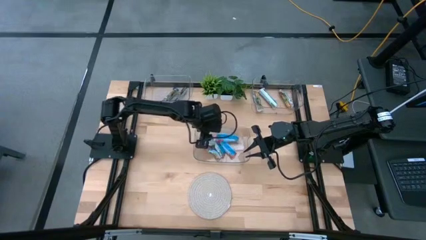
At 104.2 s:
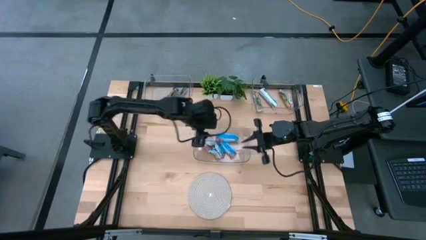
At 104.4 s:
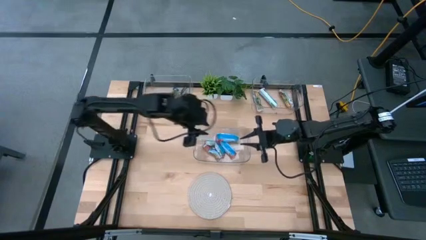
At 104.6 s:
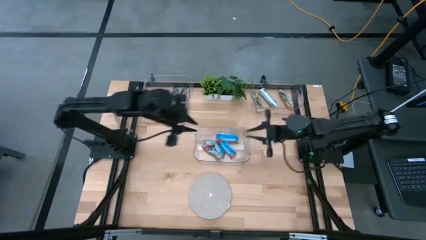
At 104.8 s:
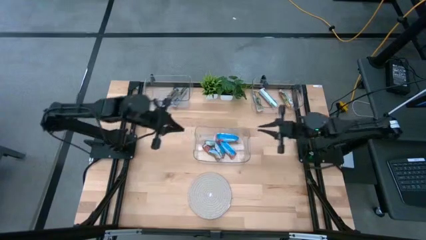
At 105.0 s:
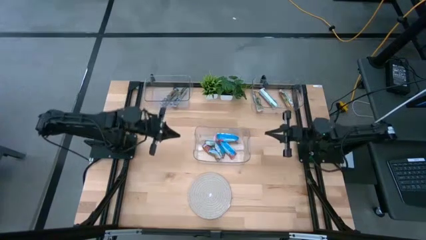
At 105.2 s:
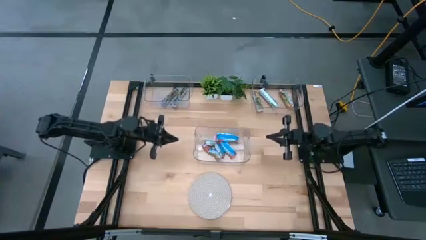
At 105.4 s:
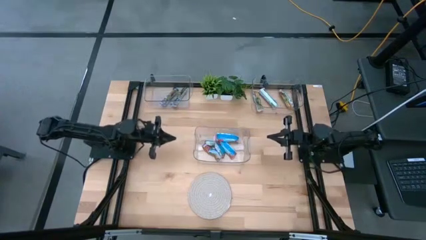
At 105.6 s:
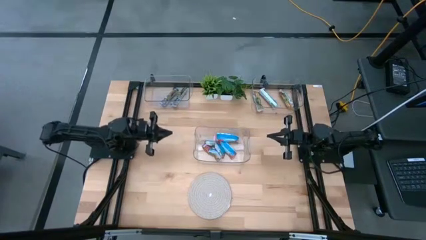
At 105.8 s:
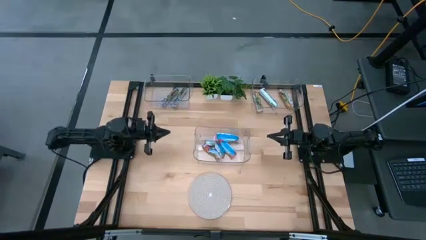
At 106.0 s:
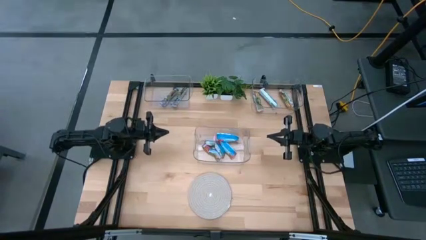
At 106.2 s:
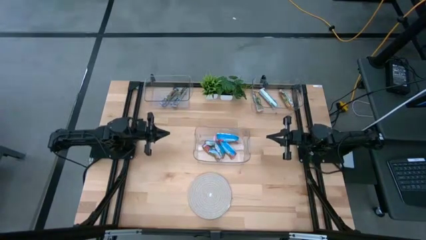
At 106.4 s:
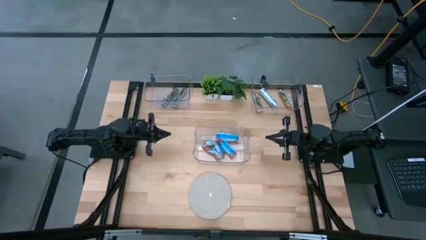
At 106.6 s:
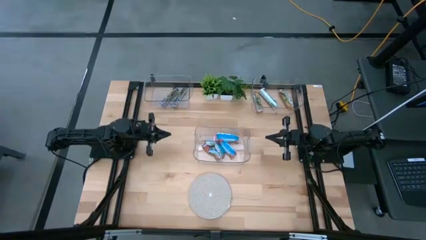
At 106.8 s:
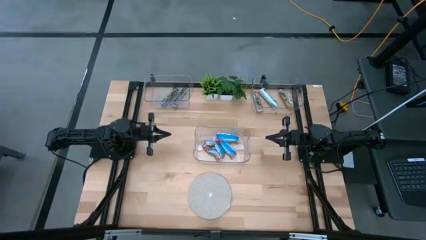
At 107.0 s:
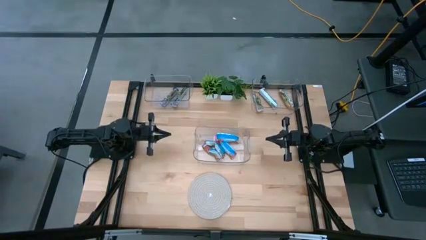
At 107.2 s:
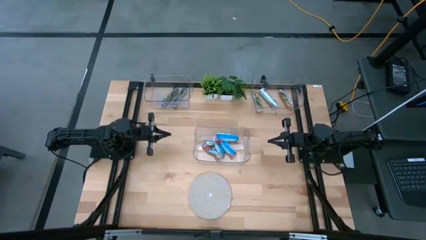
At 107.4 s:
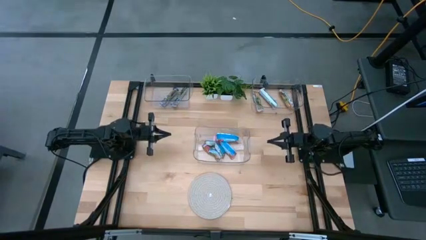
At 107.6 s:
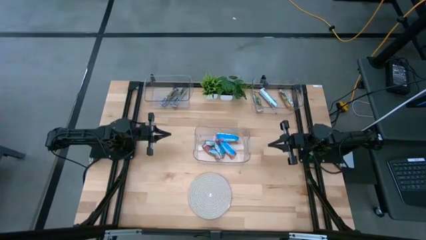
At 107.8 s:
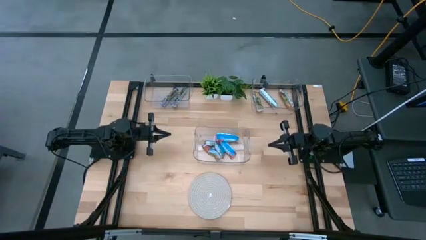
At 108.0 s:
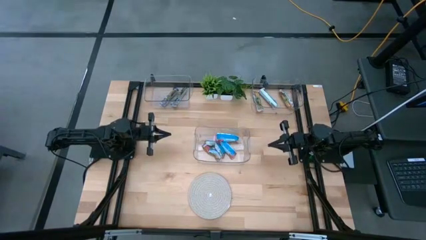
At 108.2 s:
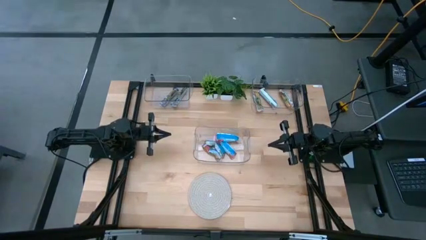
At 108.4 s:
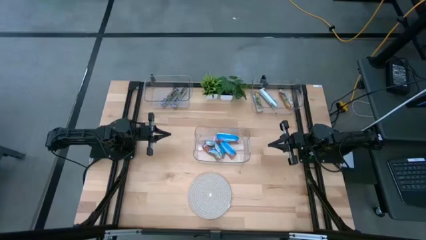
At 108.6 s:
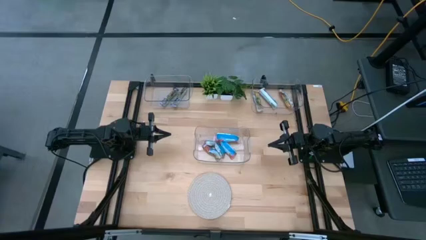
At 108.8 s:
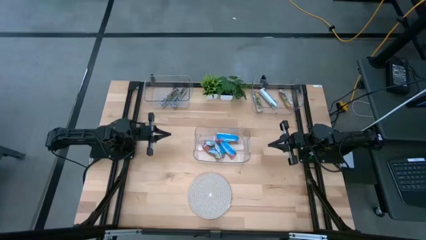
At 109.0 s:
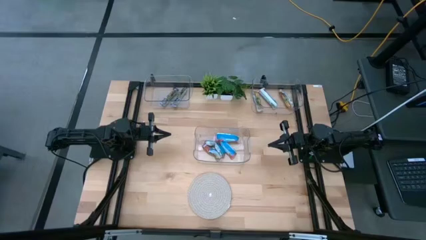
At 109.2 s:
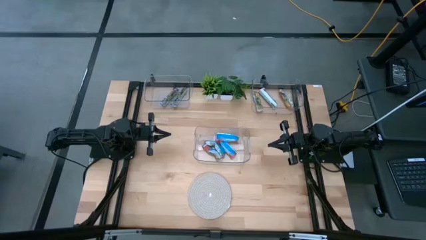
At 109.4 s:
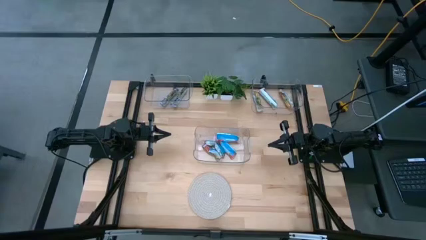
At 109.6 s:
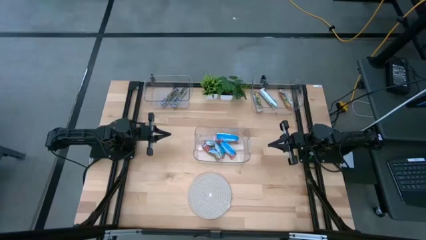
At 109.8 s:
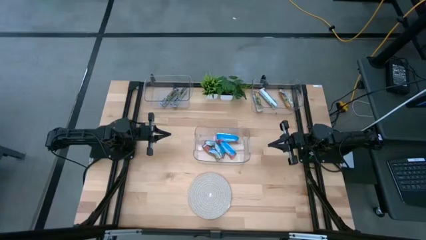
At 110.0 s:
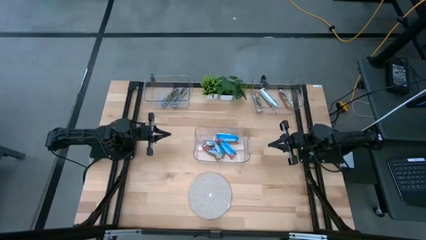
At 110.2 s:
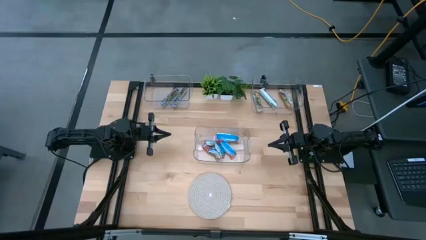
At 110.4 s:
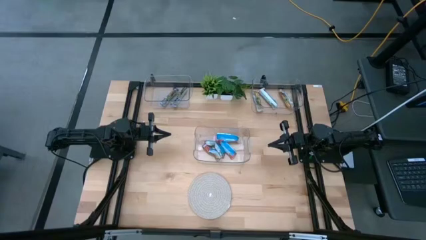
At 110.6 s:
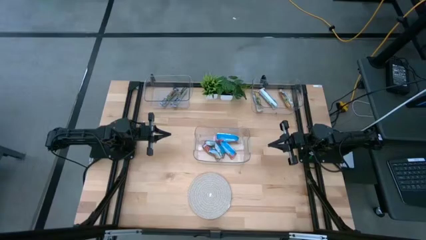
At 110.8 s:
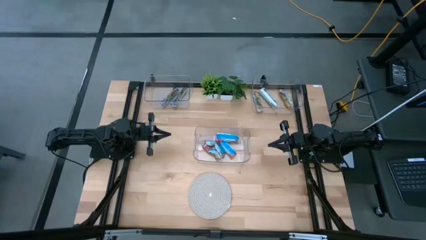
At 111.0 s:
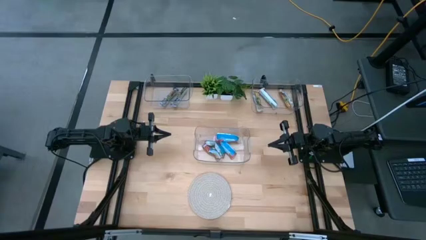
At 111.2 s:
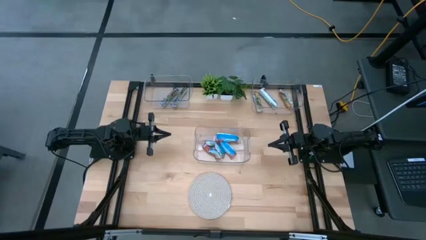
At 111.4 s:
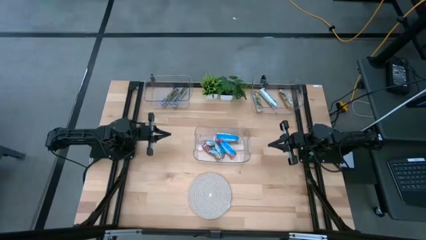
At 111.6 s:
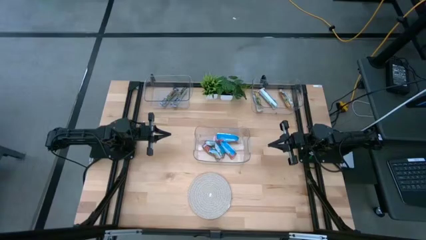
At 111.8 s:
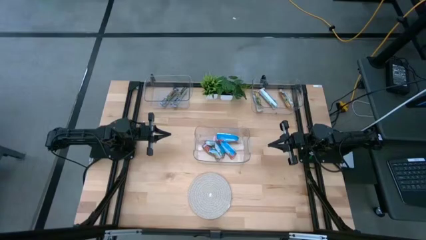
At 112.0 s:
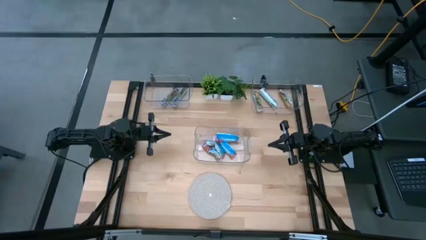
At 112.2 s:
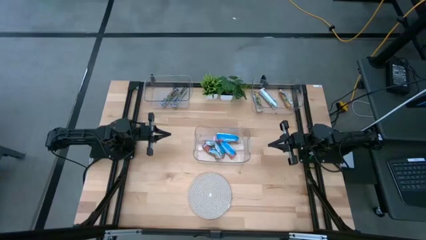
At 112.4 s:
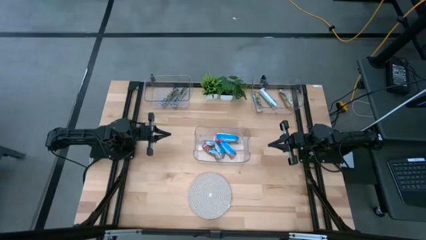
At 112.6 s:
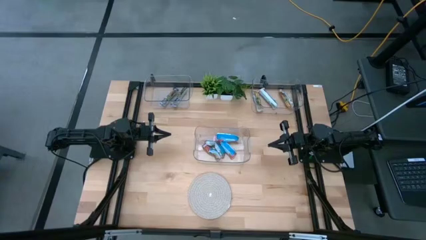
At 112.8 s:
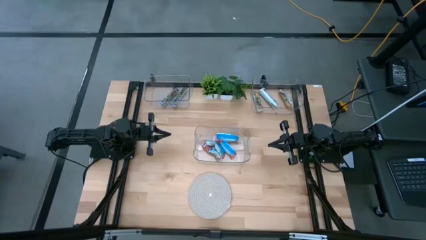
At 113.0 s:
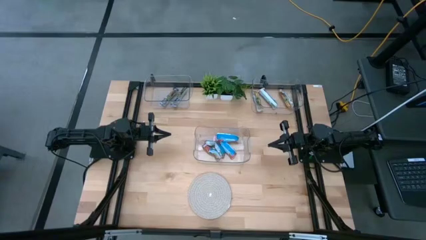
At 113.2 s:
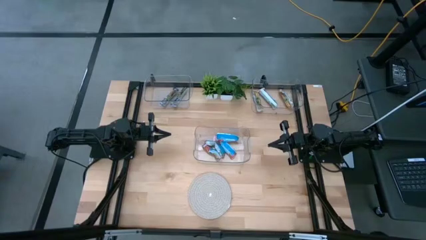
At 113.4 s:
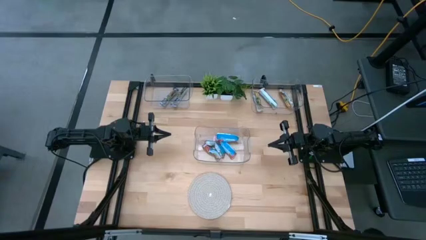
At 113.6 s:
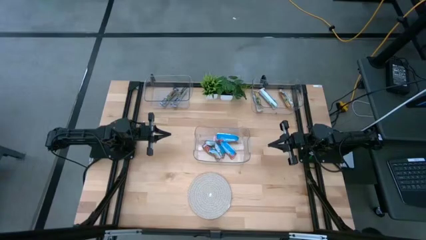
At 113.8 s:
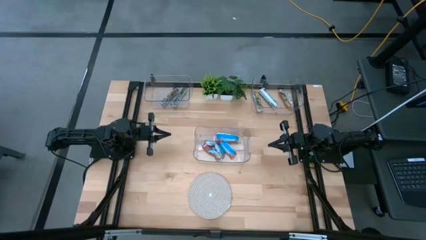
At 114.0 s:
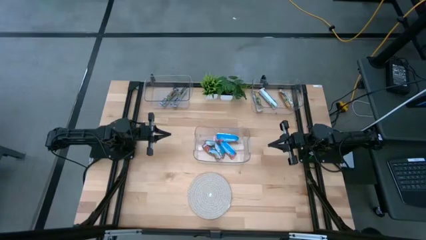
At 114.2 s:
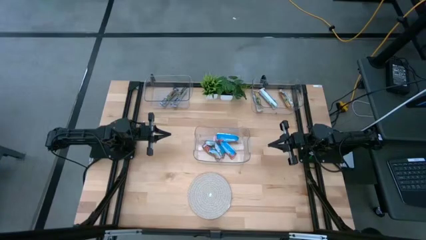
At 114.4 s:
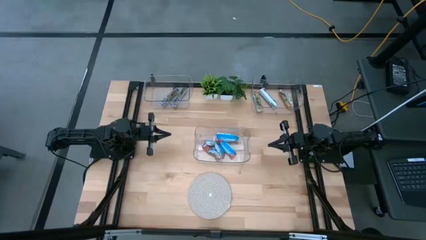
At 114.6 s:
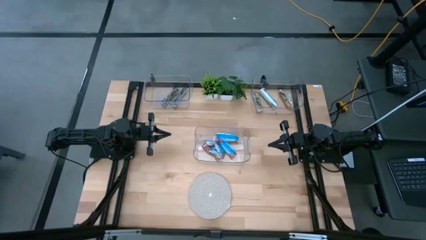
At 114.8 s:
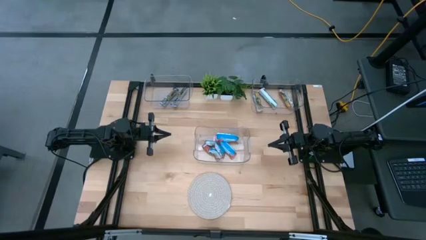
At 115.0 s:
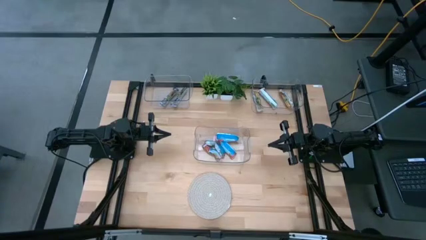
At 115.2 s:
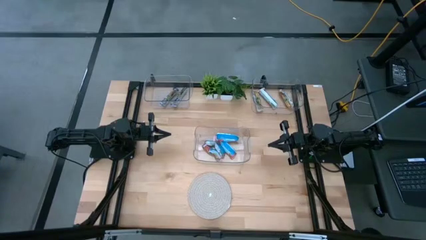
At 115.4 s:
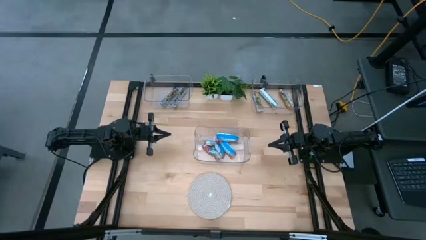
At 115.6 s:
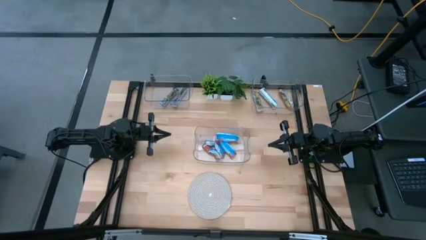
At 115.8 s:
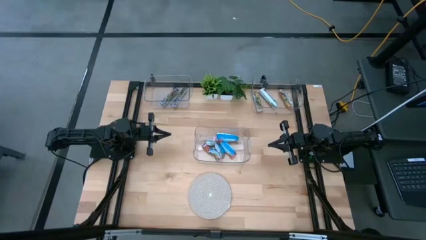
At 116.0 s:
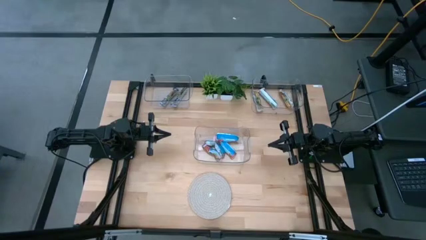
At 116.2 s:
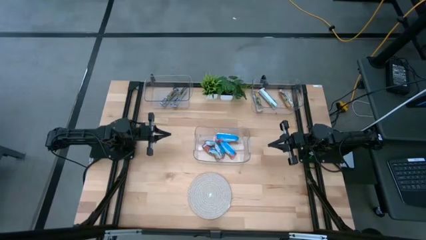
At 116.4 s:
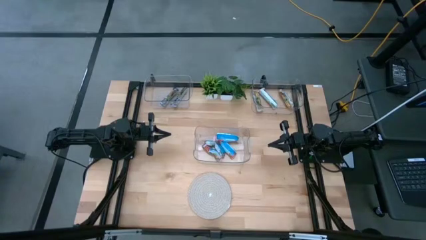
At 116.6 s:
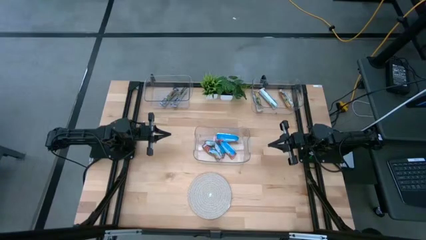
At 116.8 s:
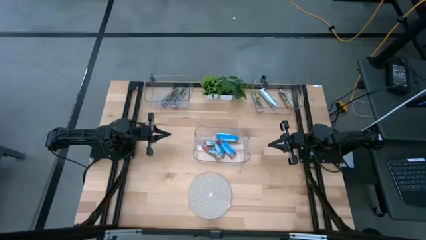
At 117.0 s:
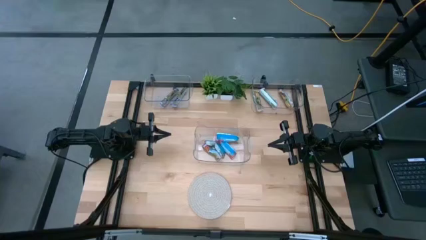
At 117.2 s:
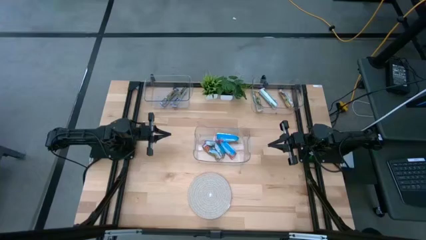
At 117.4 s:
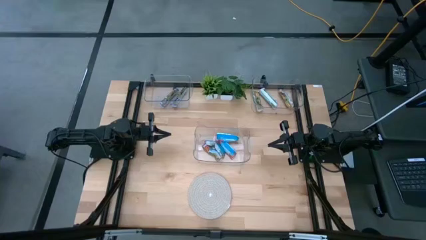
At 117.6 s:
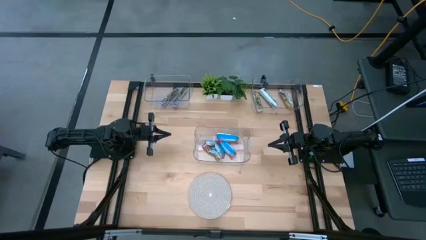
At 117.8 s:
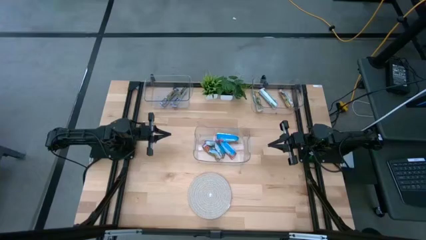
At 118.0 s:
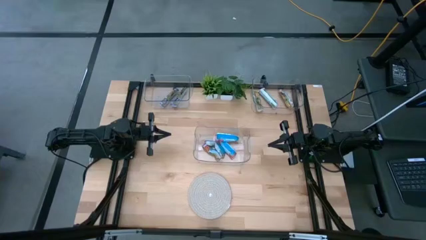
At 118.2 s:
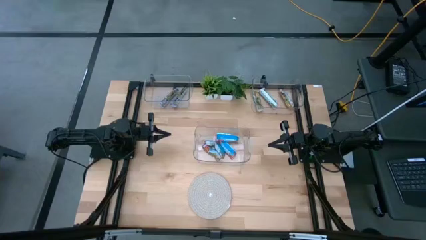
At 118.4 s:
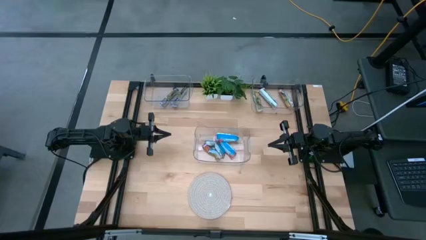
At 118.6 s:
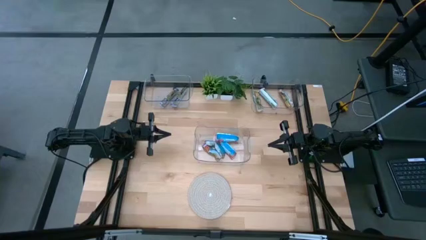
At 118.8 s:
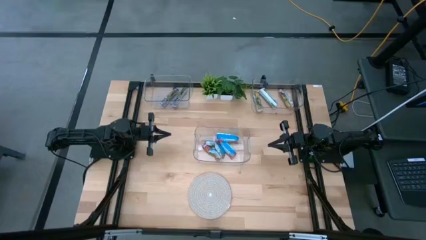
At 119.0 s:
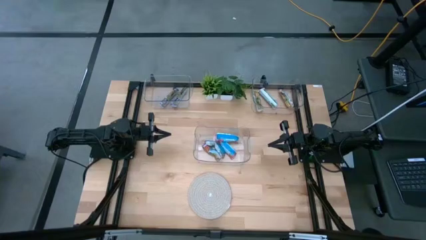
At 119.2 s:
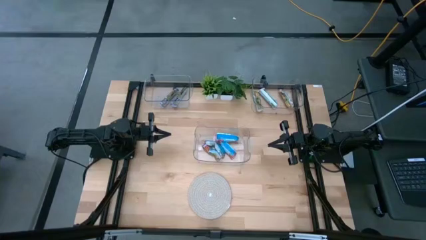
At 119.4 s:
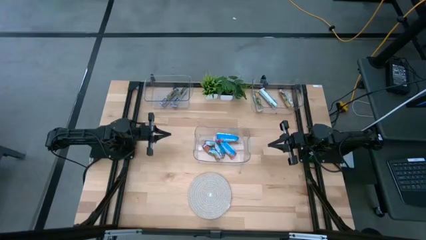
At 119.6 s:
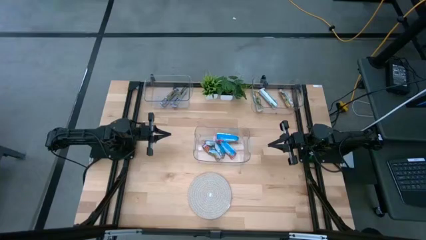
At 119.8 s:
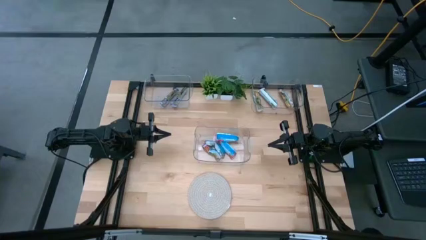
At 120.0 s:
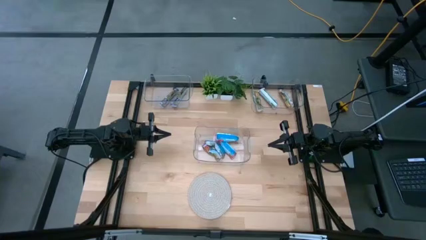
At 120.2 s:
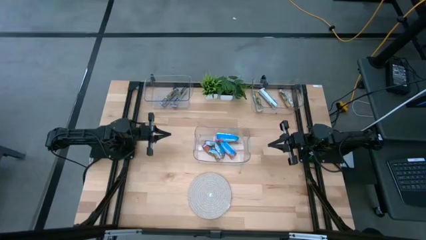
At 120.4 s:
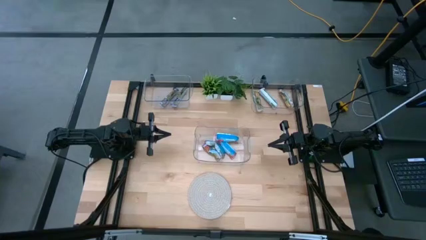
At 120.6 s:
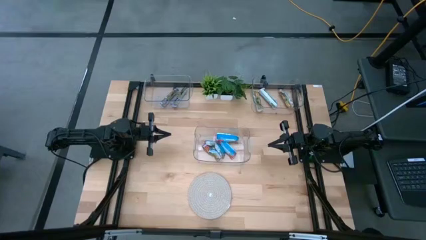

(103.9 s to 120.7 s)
Task: Pick and place Granola Bars by type
Return to Home Position
